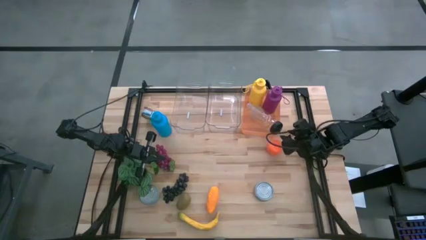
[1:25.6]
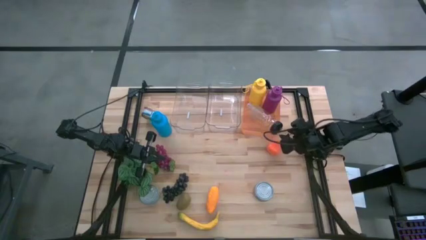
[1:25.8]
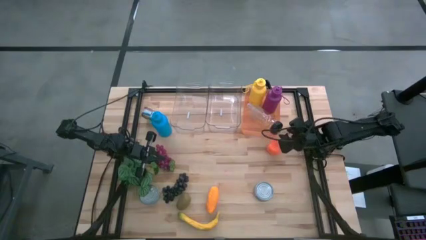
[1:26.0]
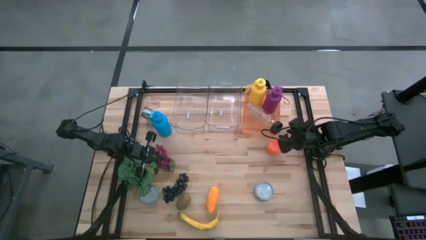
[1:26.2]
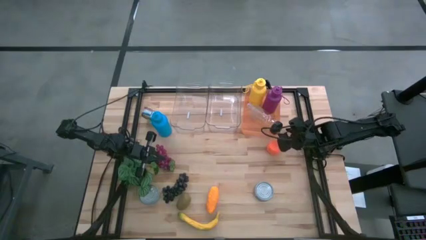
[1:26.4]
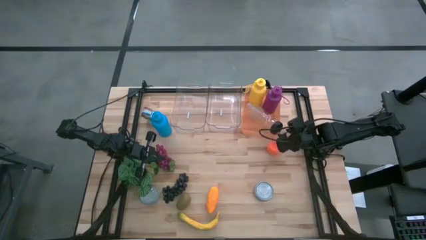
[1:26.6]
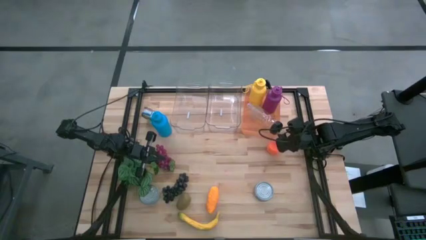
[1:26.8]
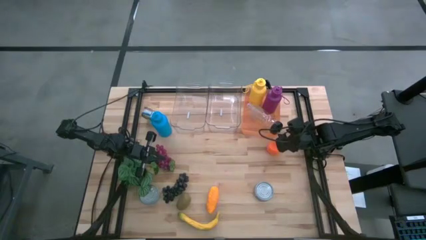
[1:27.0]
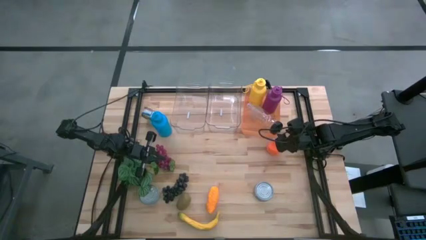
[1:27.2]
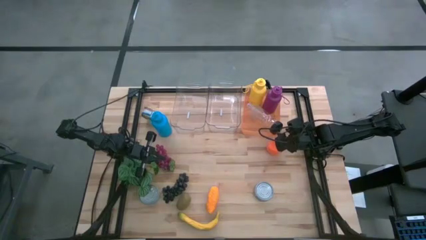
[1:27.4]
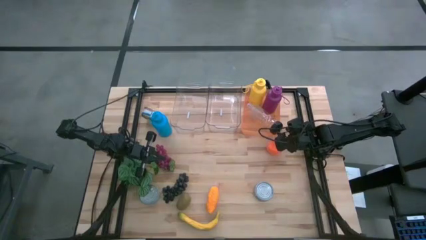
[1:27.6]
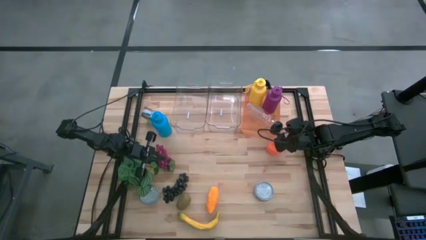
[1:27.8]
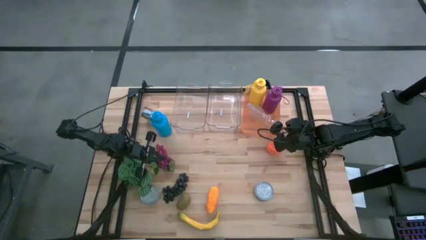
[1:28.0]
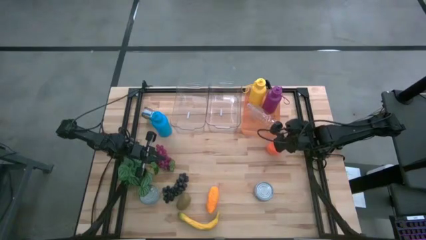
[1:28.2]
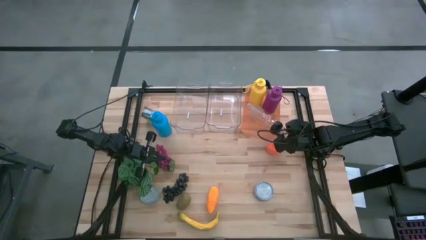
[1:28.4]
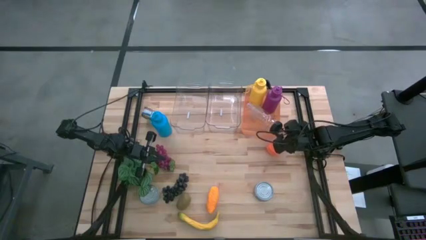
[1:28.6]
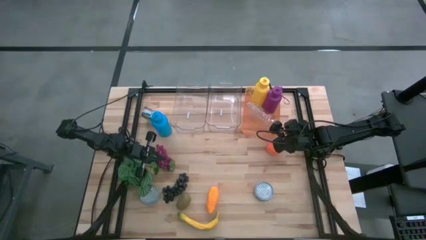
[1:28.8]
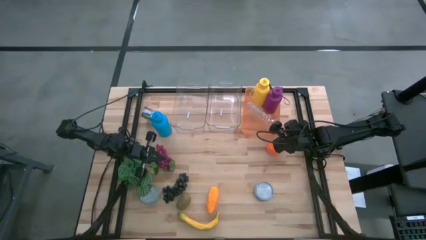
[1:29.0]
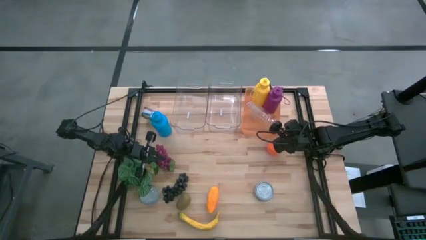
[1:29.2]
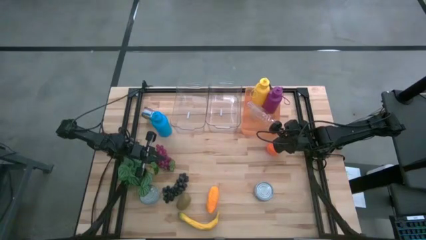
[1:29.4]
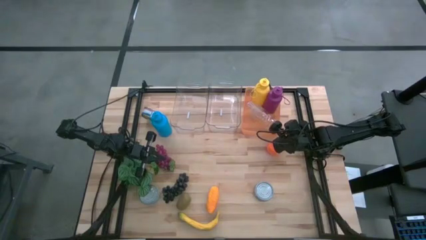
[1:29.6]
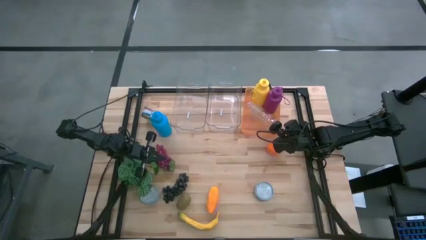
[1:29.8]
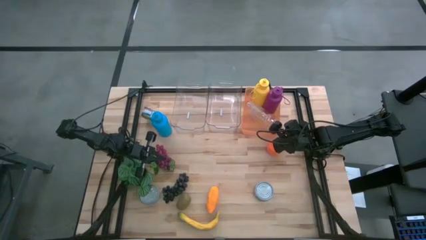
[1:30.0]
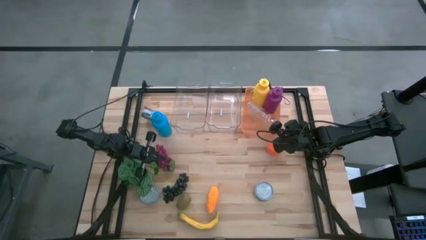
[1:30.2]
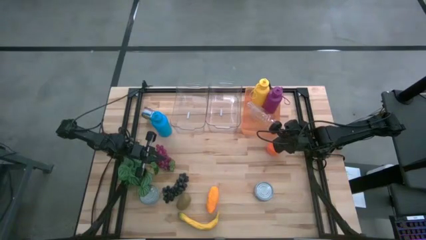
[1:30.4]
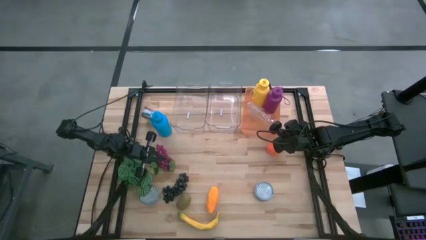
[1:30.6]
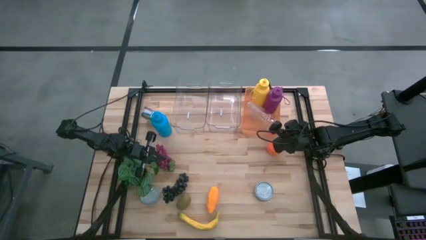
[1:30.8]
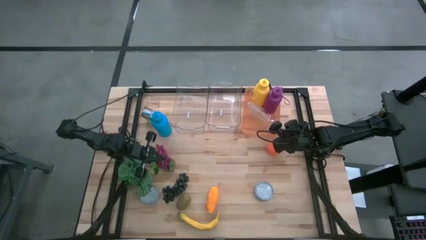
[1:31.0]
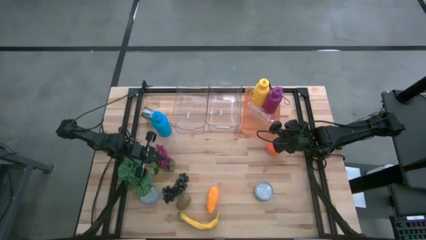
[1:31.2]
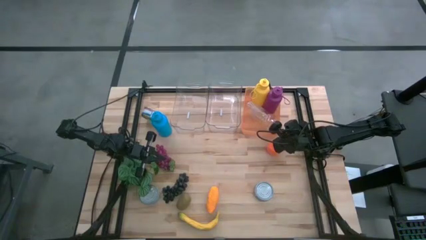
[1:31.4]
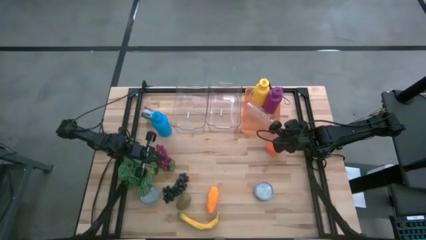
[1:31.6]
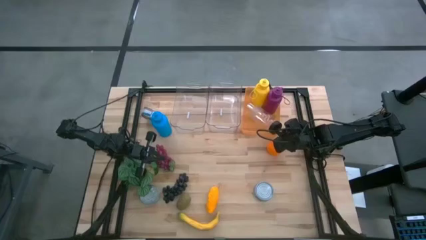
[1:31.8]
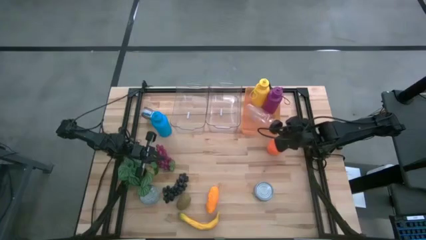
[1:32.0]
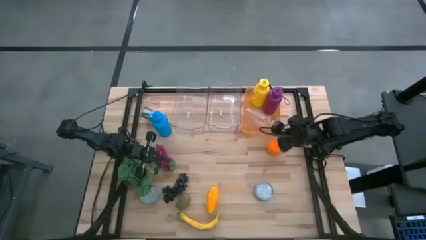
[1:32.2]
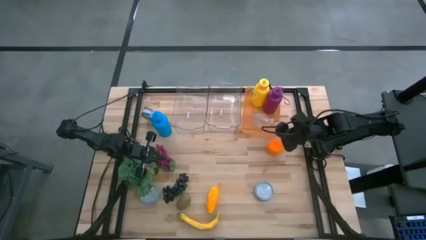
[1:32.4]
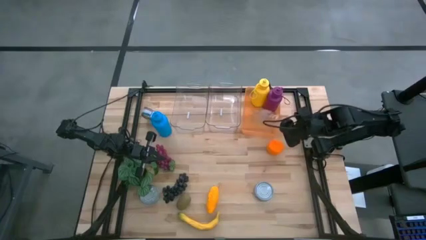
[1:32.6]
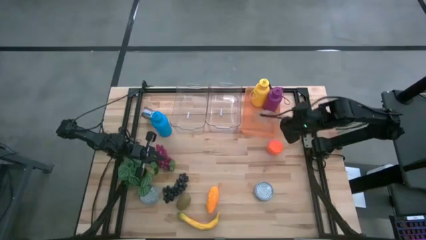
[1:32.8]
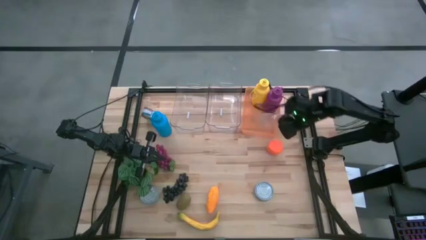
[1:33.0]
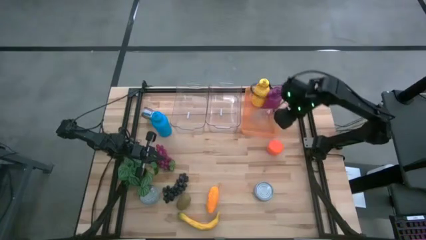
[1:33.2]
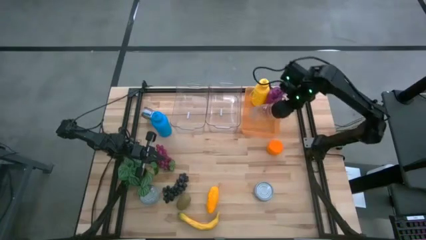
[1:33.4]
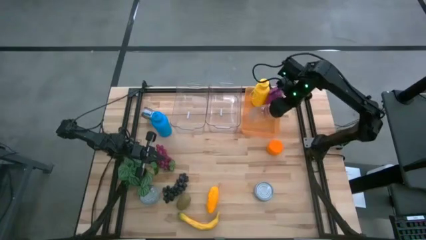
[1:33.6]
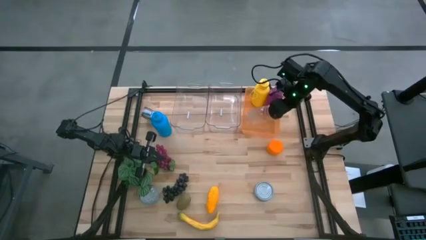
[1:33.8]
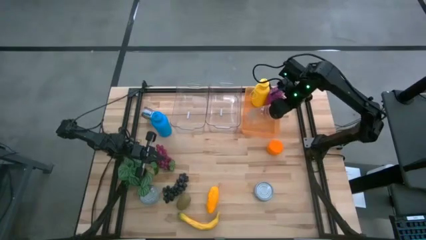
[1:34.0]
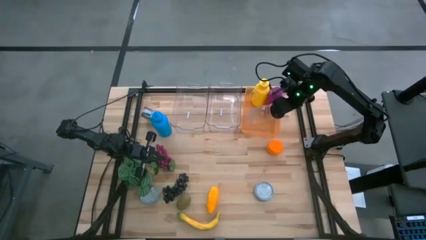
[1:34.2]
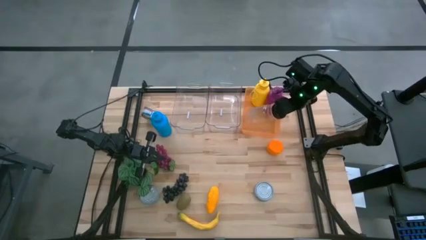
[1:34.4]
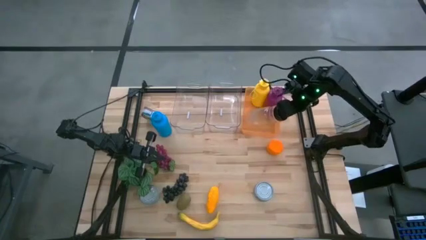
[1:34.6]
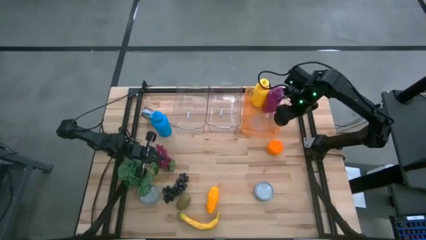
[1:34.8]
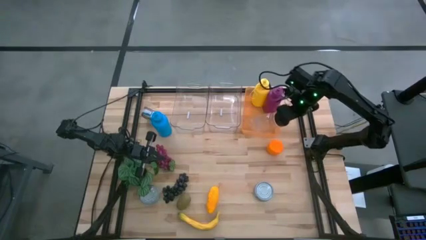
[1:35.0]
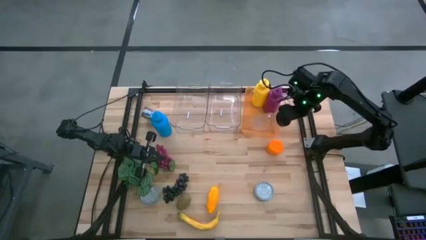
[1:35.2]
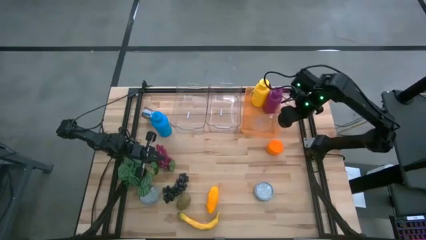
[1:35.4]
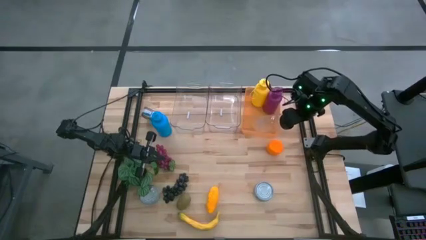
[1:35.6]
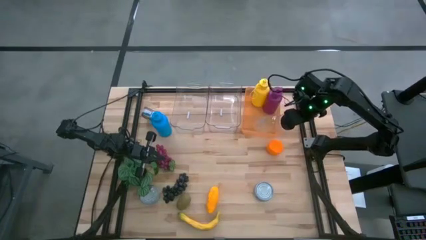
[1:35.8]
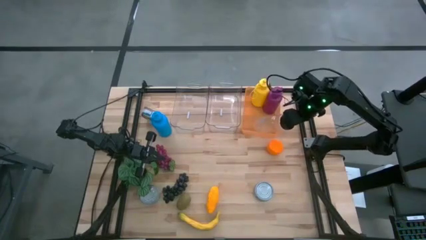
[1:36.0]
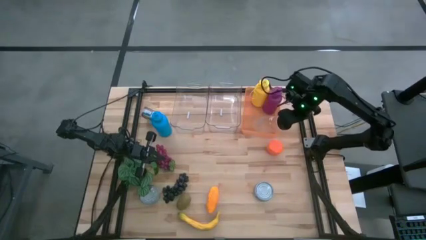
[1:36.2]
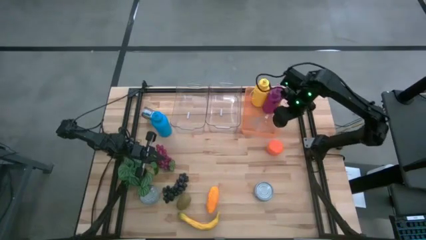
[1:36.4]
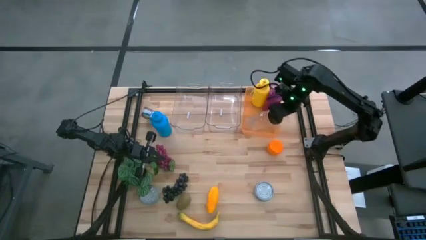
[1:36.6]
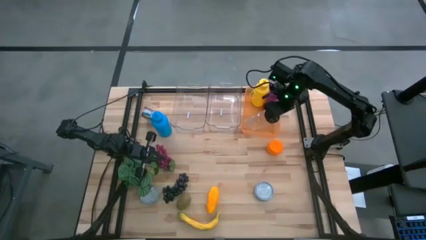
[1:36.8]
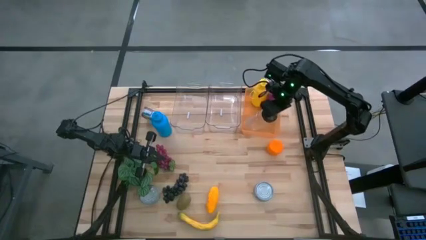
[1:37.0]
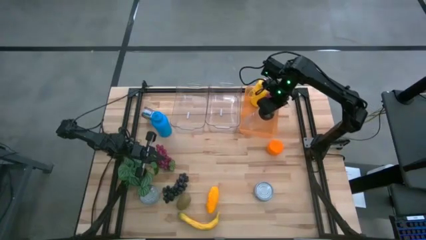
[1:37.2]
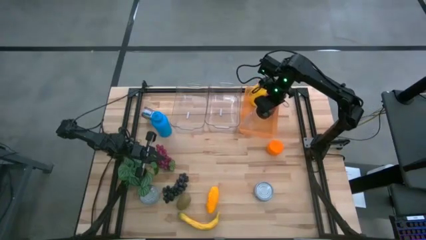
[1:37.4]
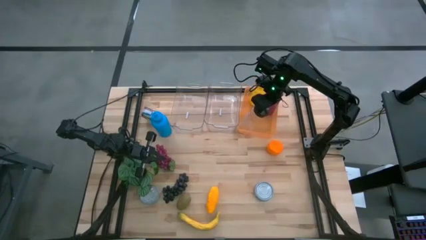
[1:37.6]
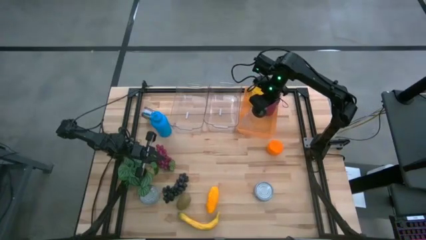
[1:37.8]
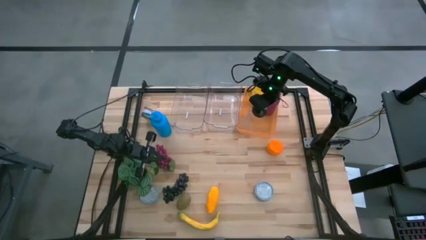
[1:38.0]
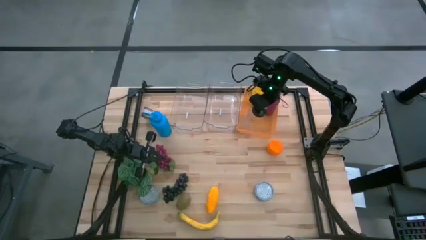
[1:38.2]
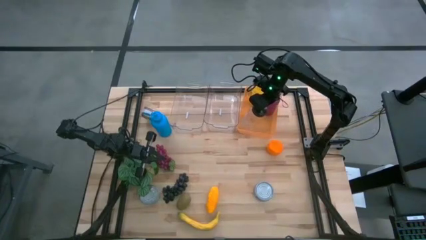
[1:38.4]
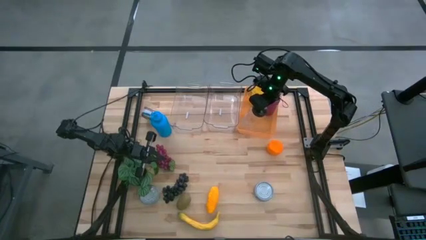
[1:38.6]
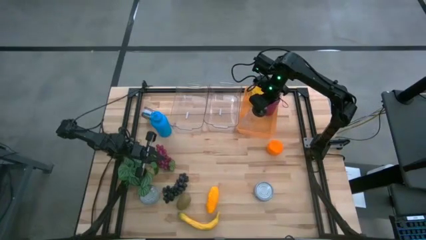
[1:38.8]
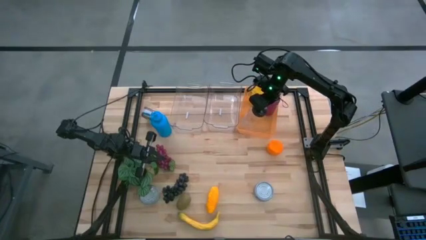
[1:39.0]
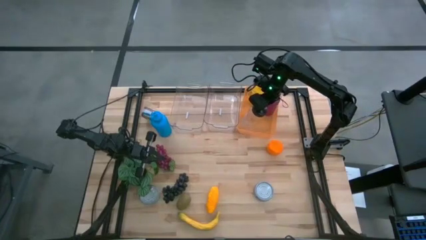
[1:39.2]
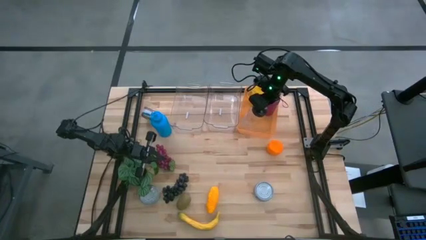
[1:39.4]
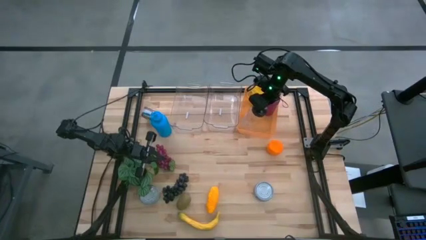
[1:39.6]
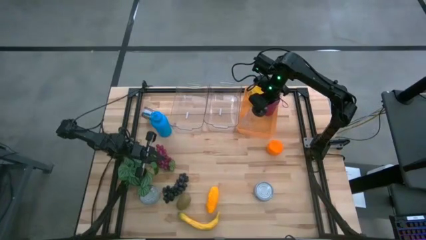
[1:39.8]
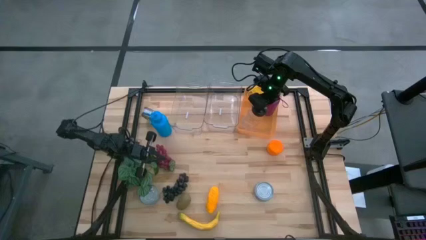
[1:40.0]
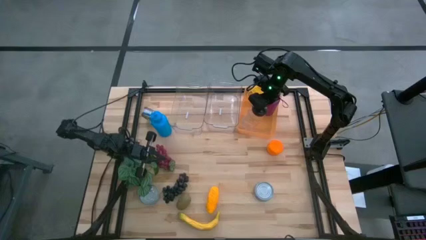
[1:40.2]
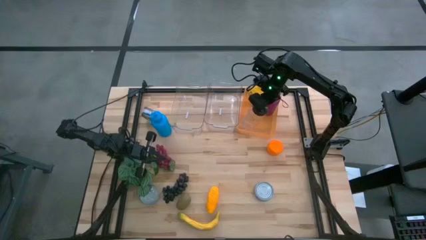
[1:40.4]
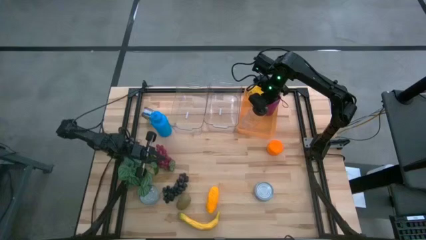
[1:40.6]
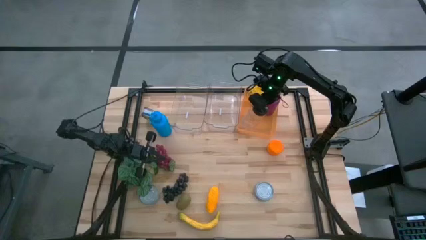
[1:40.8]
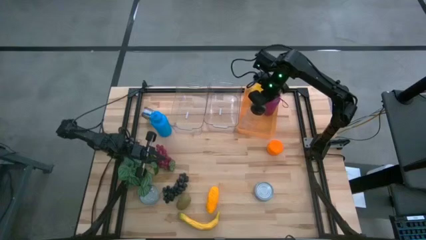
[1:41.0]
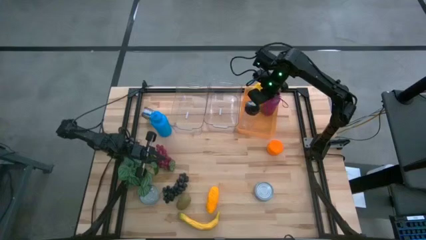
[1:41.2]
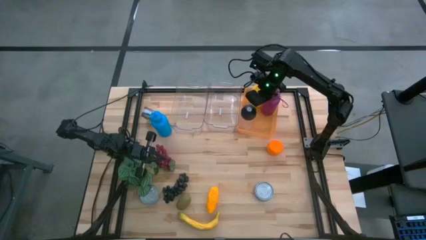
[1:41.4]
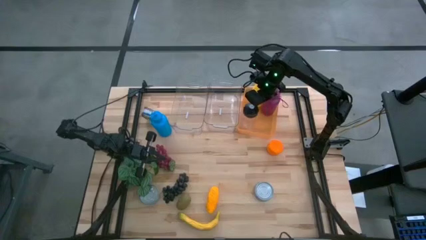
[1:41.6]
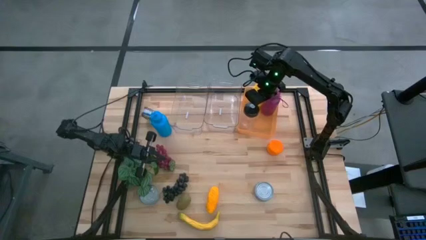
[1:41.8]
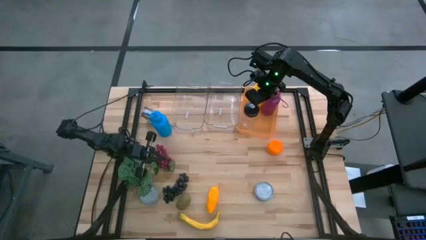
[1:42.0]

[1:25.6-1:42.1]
Task: Pick & Place Food Item
Put the transparent water bottle into the orange bin
